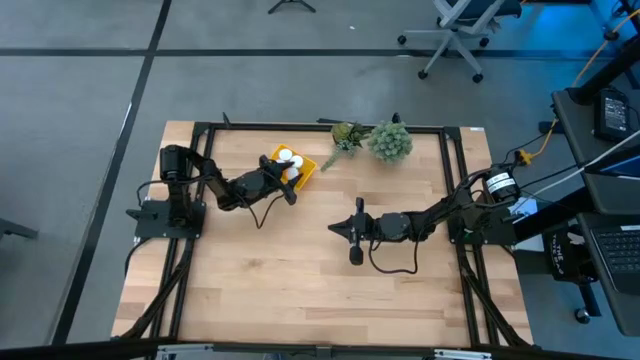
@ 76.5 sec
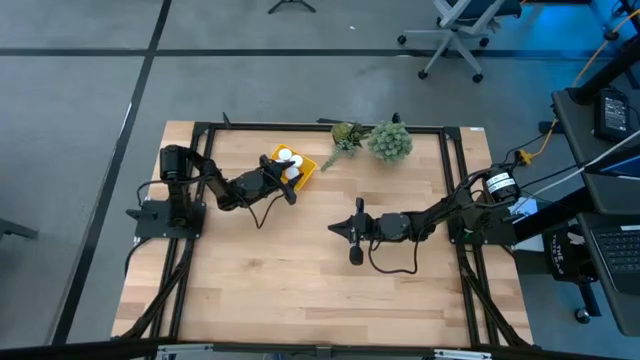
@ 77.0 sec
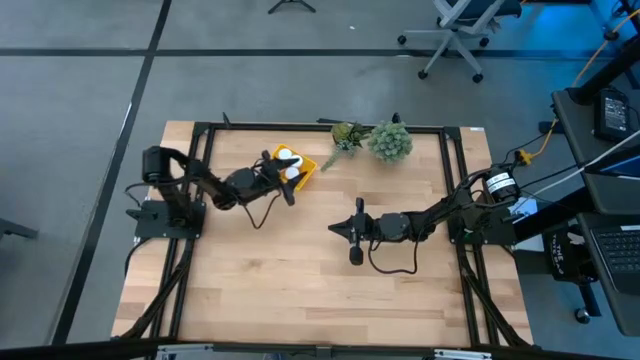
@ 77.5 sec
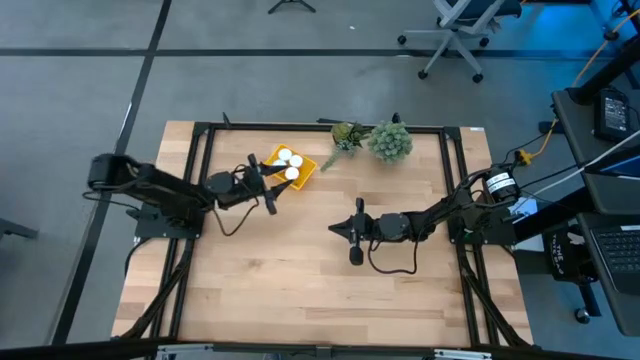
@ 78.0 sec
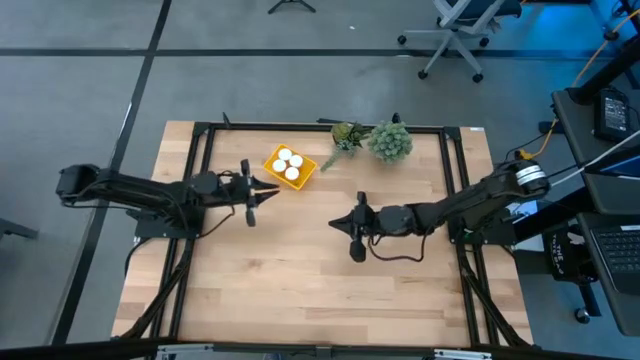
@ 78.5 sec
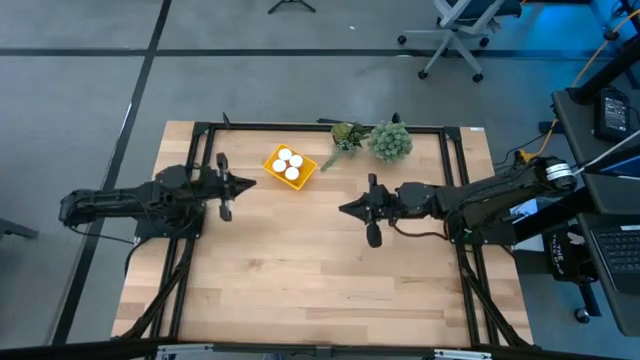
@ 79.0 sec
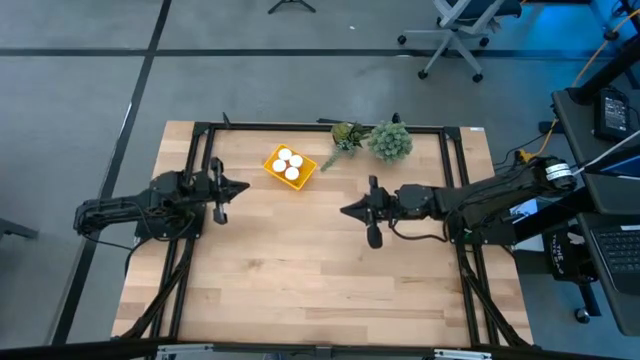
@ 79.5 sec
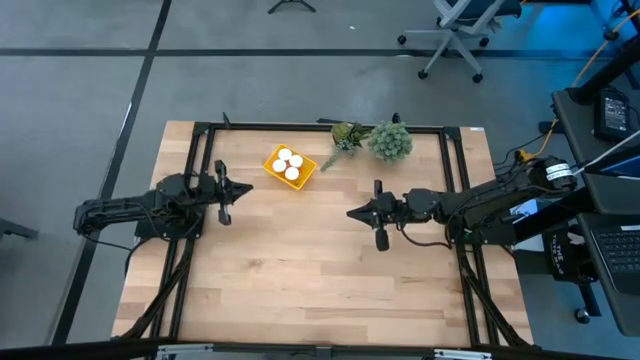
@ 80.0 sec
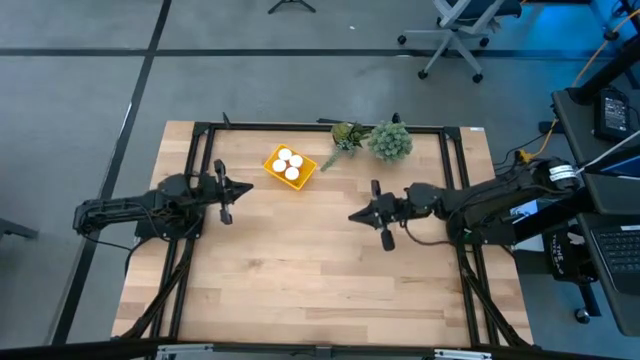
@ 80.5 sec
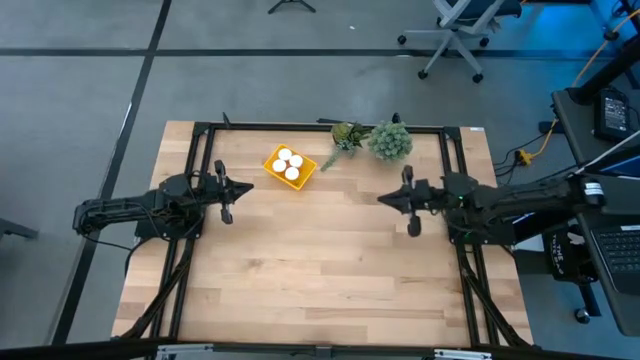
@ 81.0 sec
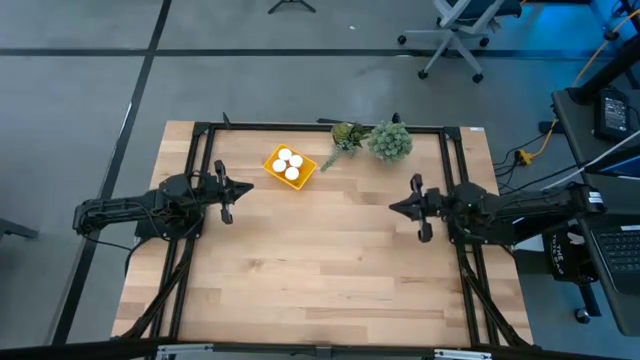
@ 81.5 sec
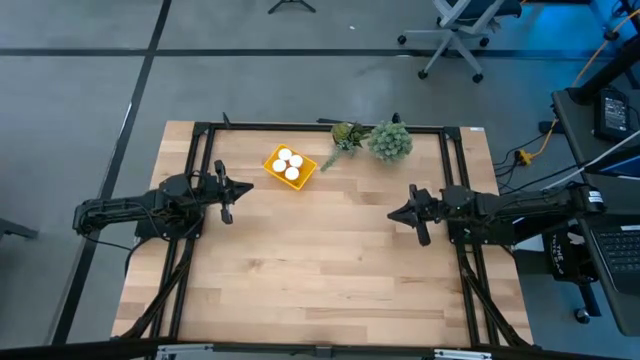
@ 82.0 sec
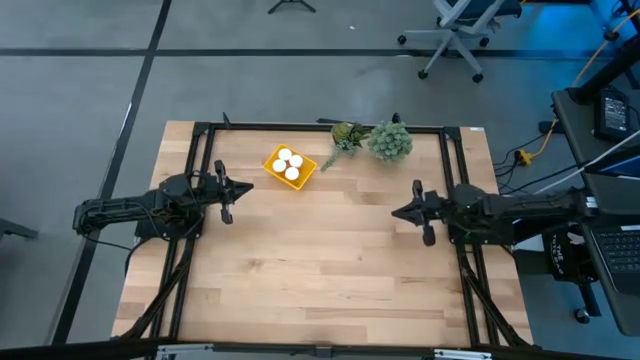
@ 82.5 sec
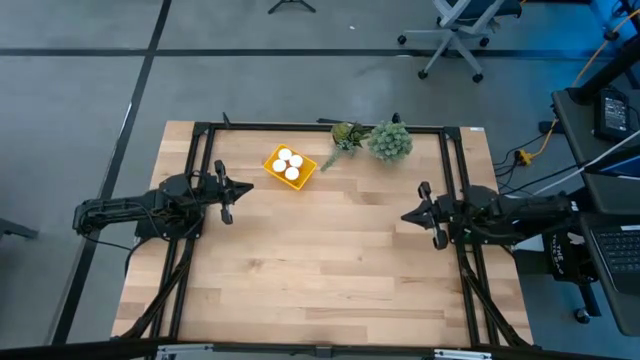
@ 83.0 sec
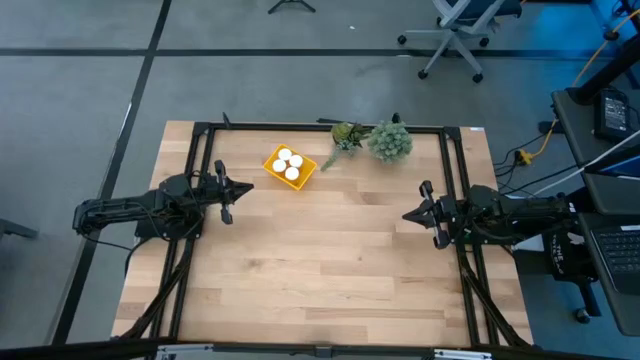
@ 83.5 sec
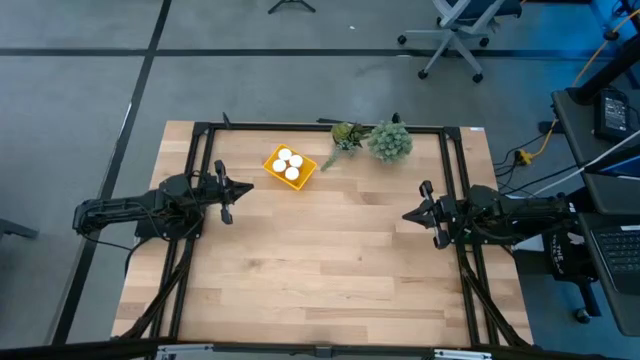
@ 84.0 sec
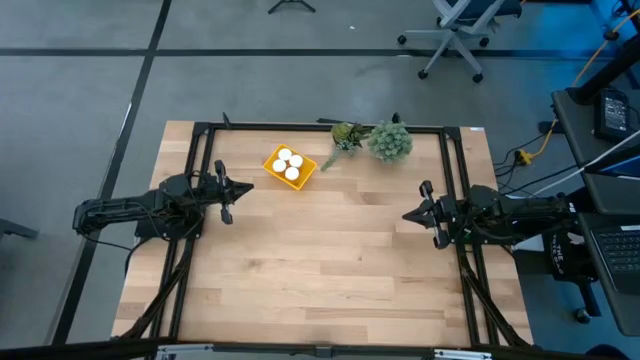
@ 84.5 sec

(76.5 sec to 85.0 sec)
Task: Pick and place pill bottles into a basket
Return to Home Position

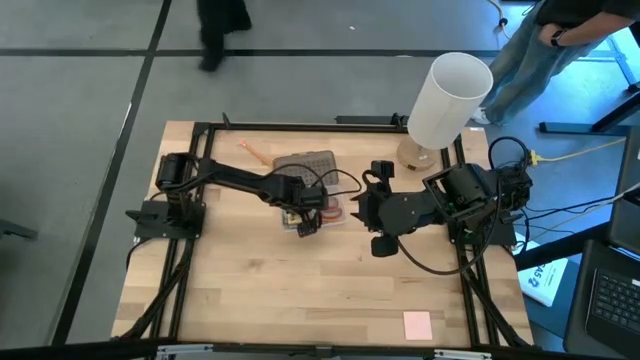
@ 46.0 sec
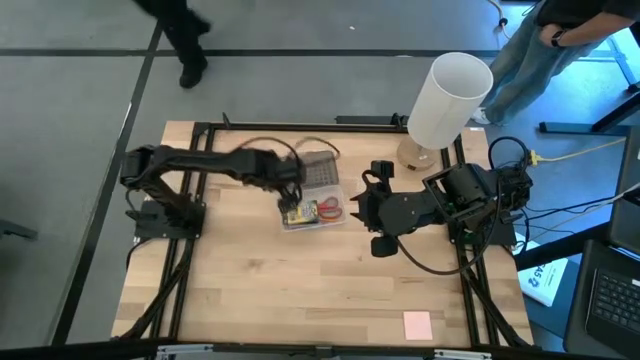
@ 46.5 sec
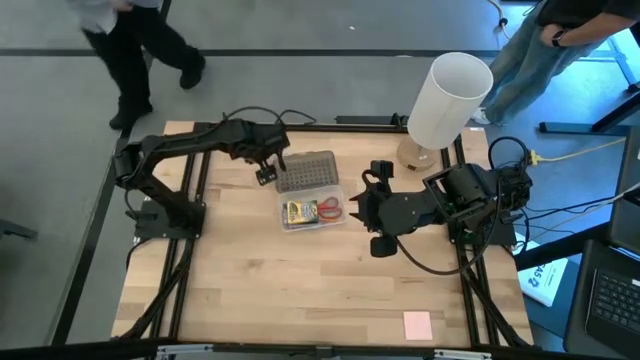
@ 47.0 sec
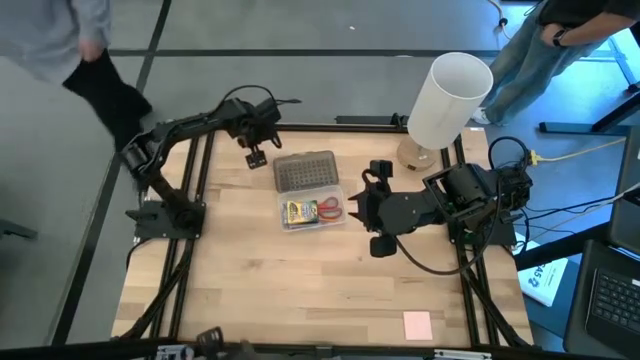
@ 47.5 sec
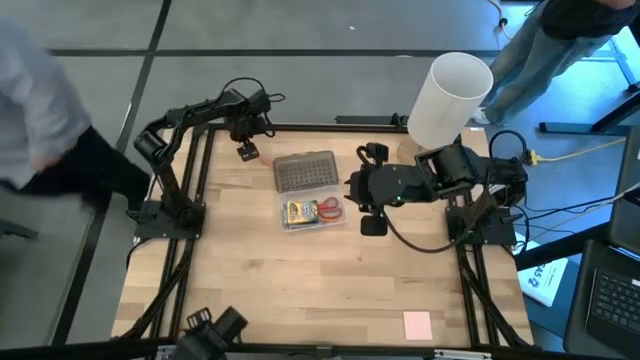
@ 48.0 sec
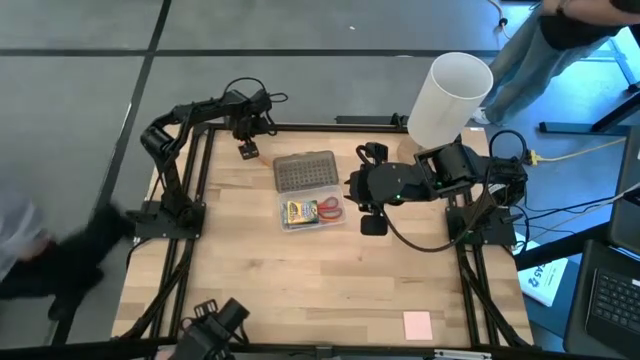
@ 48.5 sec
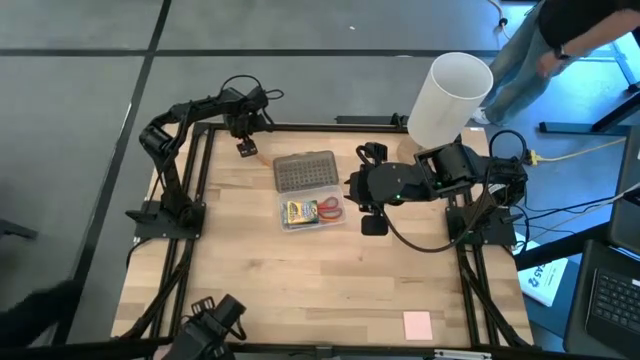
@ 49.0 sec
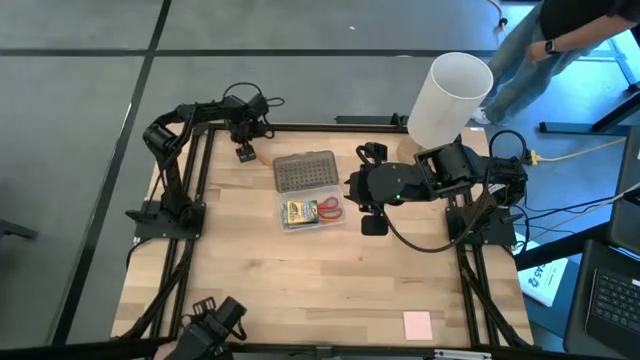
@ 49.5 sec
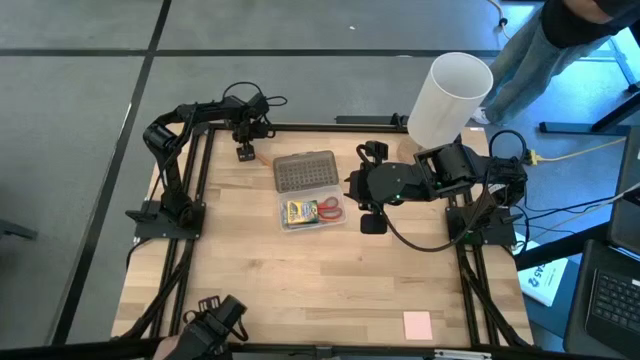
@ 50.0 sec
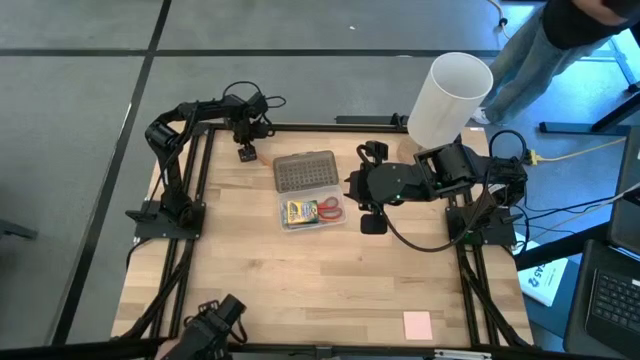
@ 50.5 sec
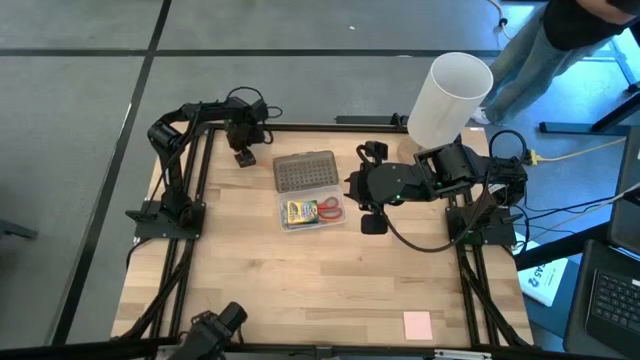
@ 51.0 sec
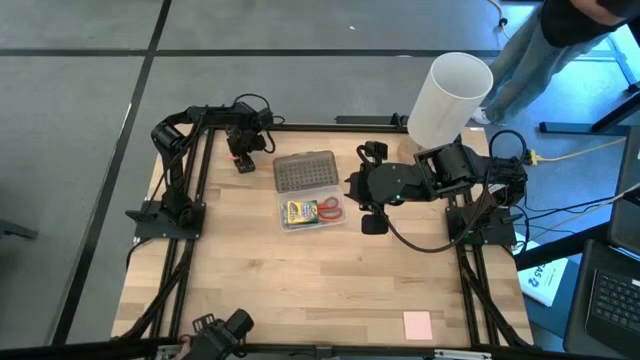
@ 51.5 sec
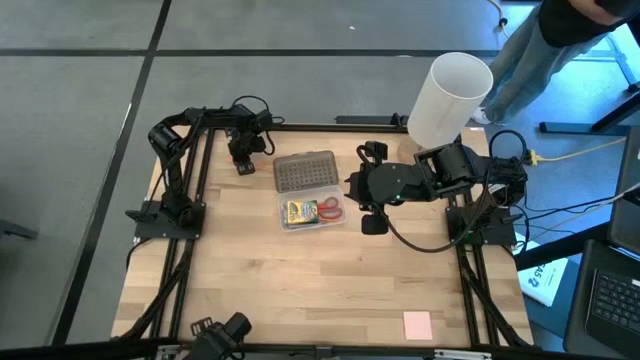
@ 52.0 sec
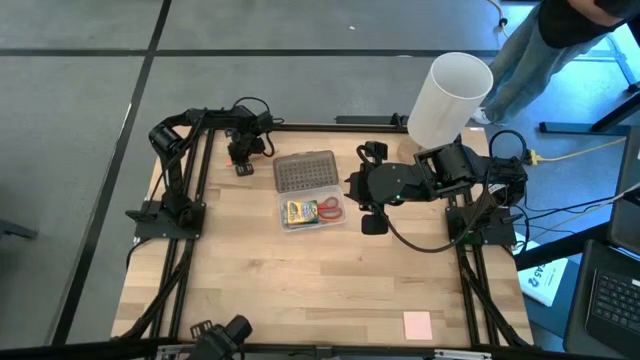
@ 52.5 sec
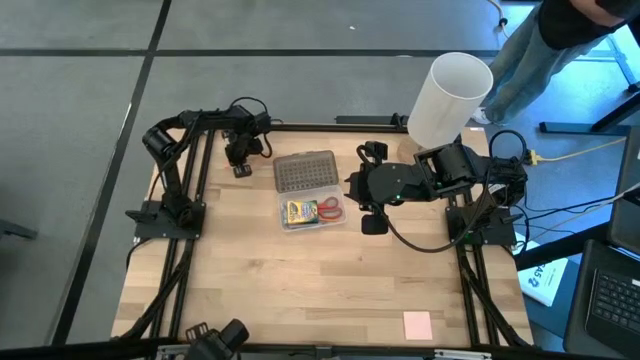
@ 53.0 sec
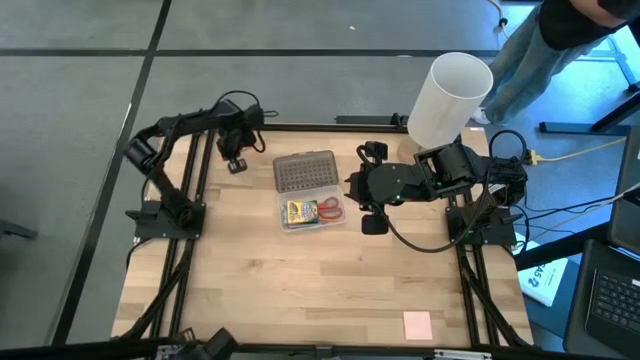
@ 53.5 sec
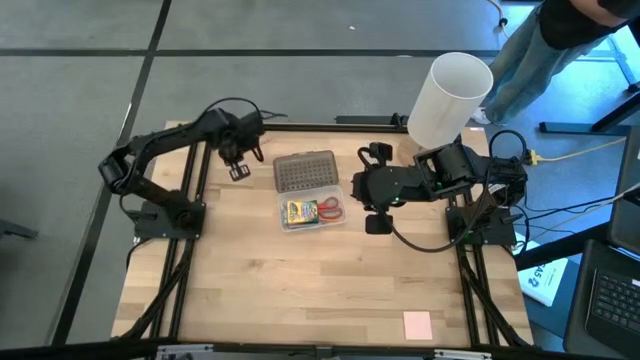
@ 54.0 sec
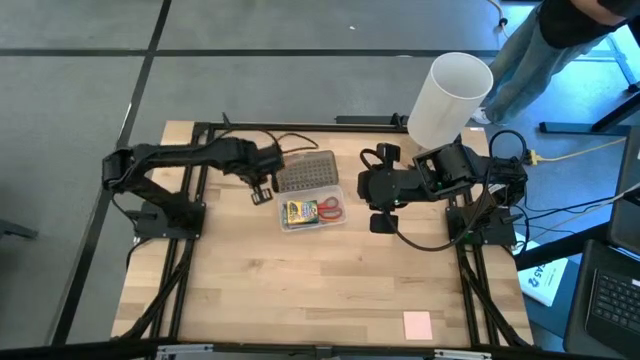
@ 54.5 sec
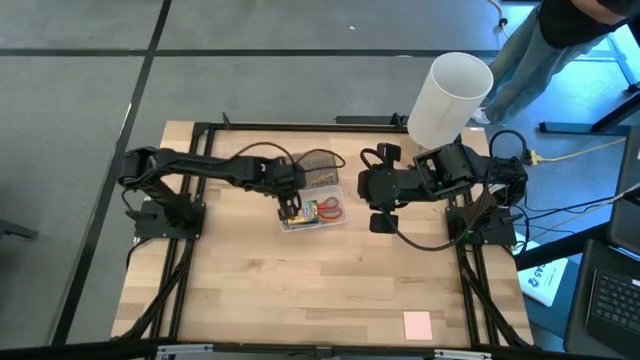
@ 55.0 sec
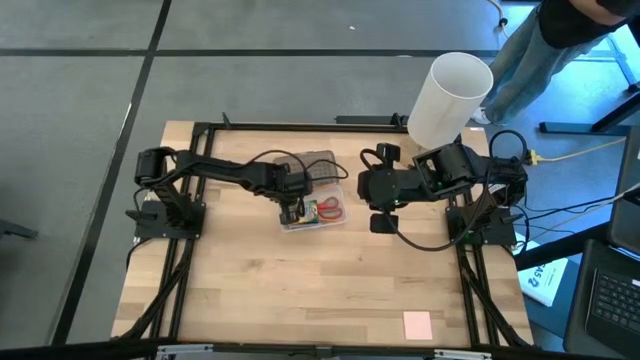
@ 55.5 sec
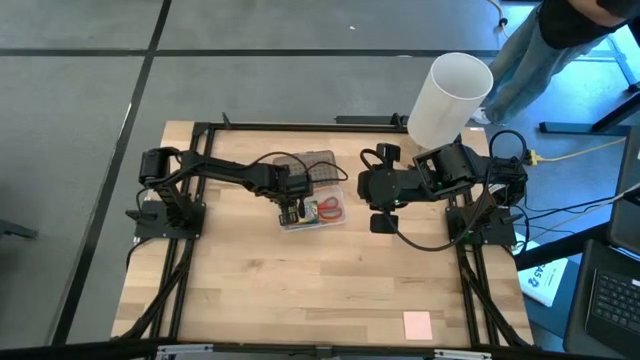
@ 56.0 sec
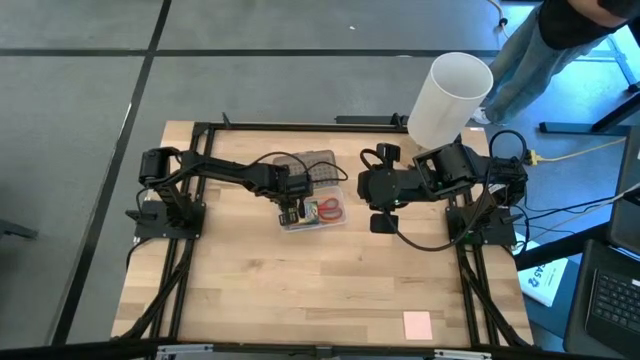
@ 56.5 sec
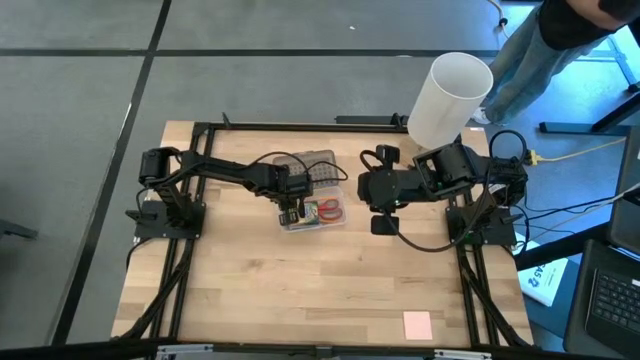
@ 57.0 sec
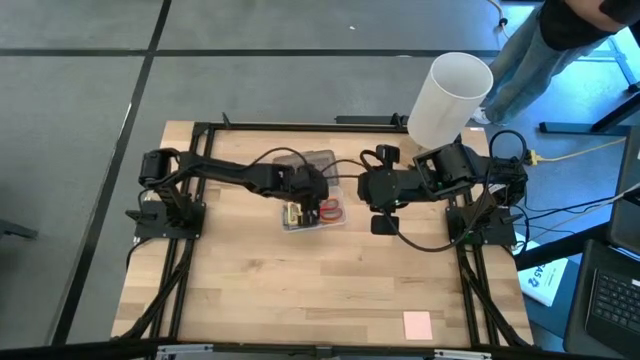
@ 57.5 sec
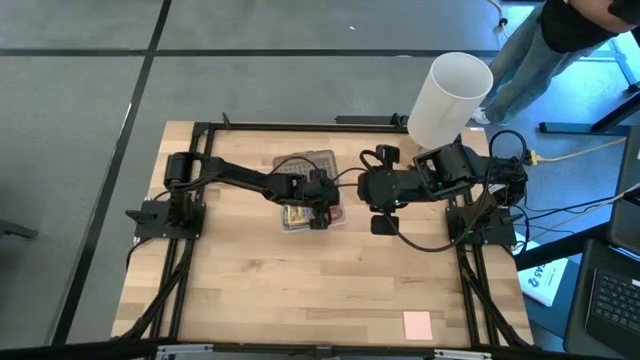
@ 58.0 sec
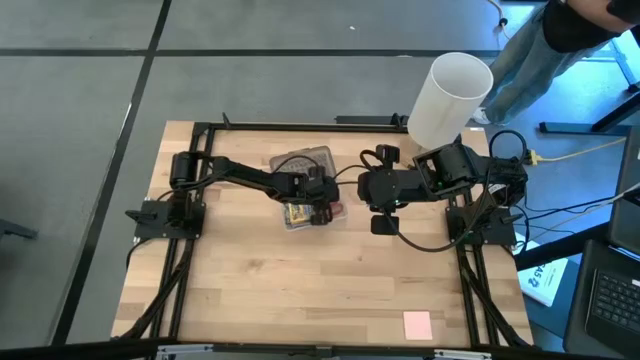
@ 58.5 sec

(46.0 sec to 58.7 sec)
Task: Pack school essentials
Put the orange pencil into the black supply box
